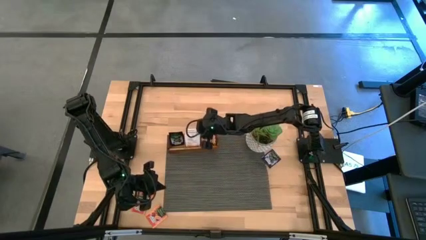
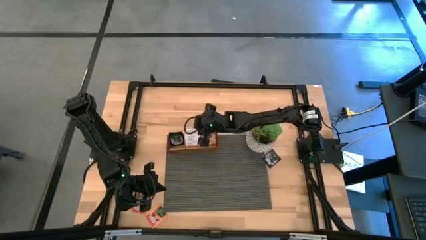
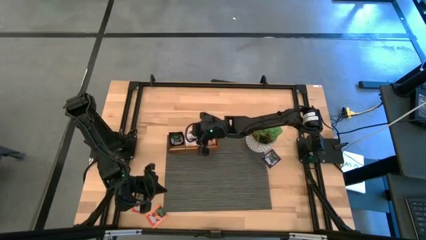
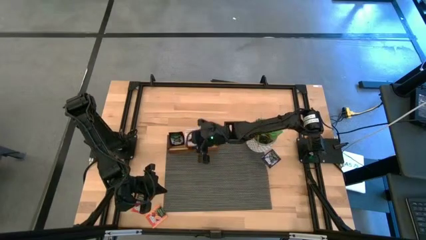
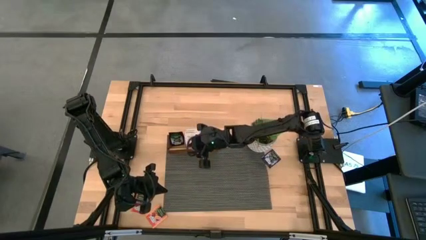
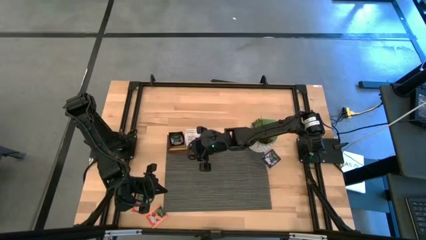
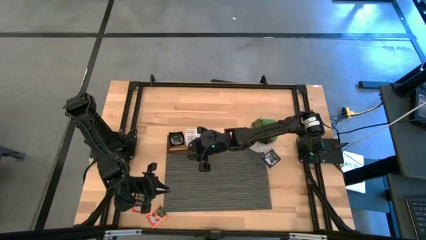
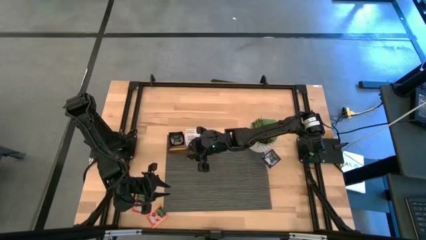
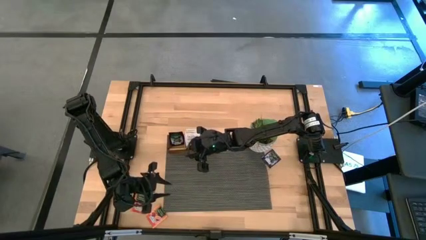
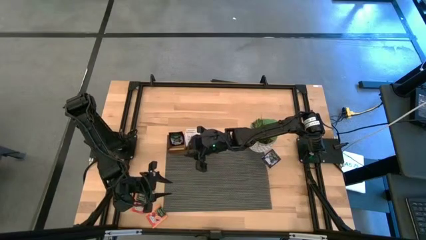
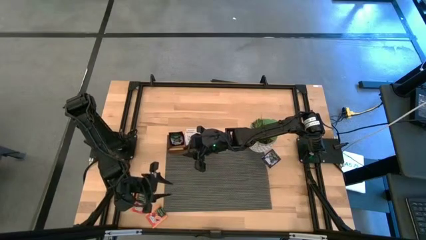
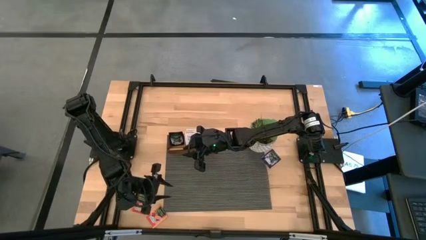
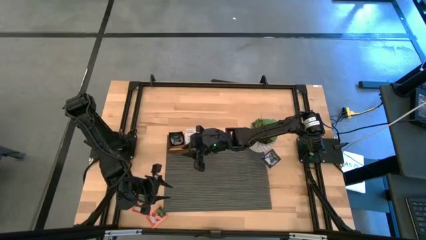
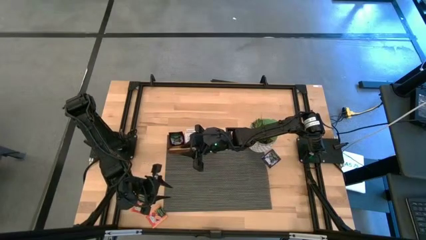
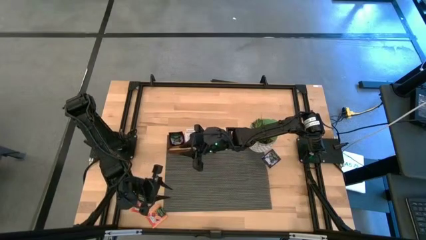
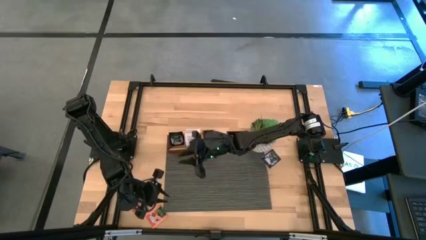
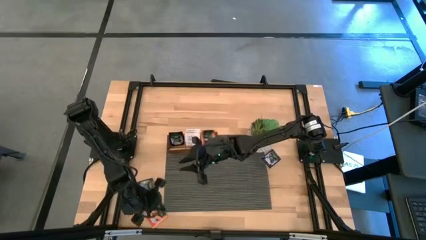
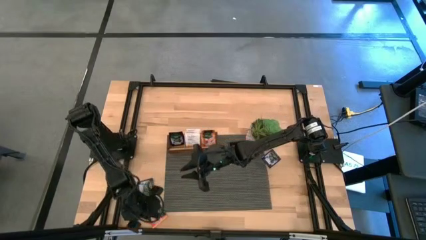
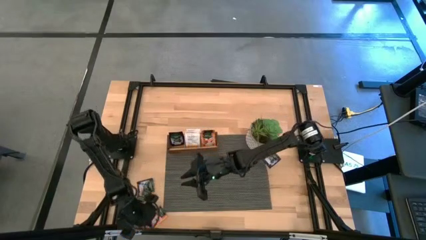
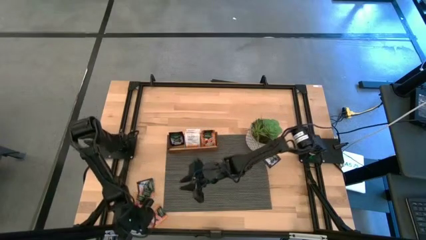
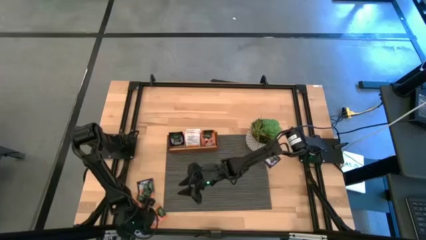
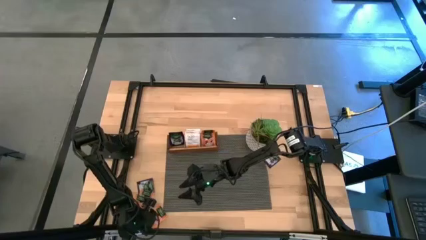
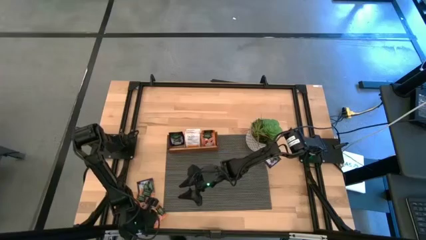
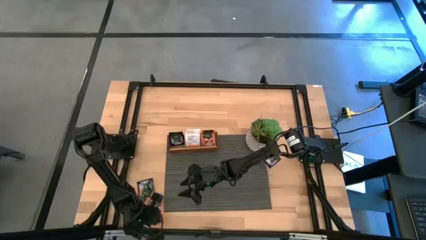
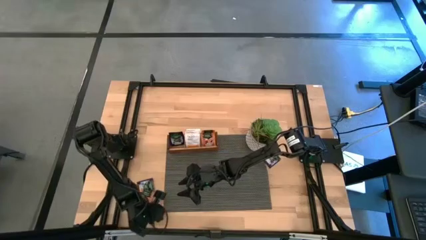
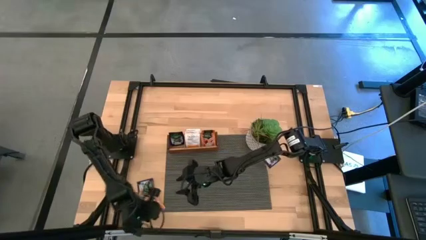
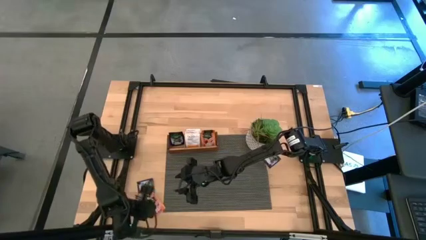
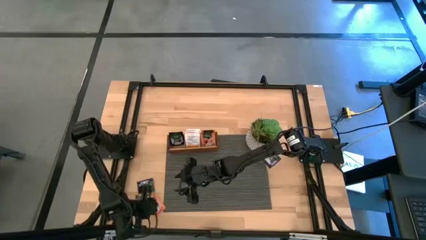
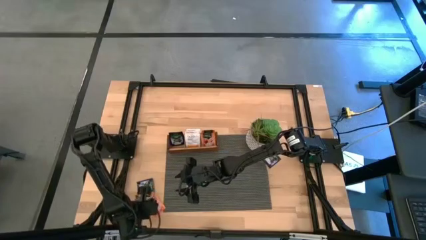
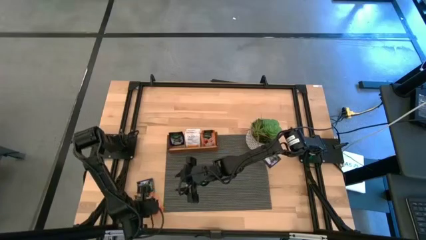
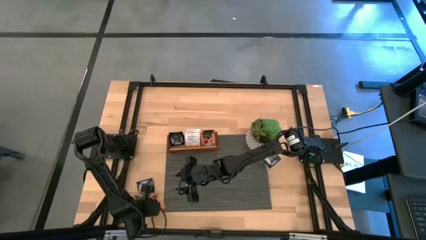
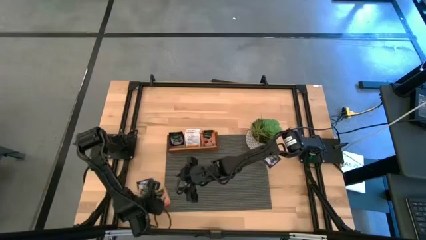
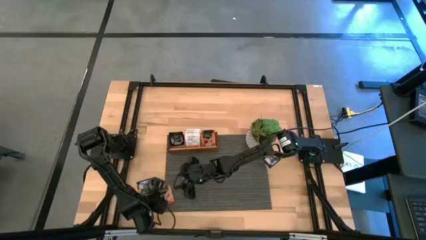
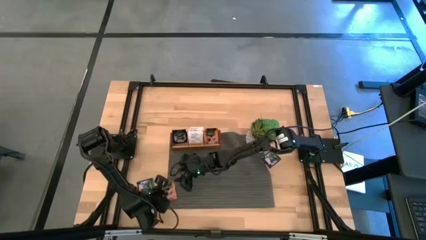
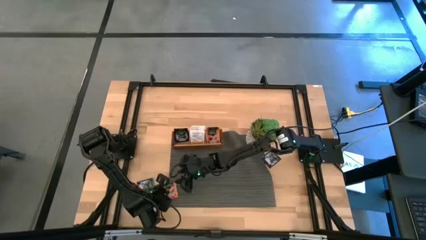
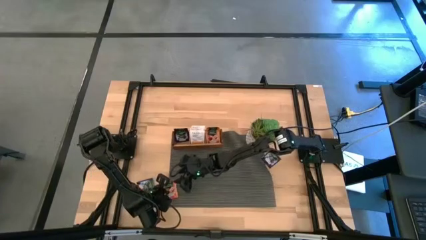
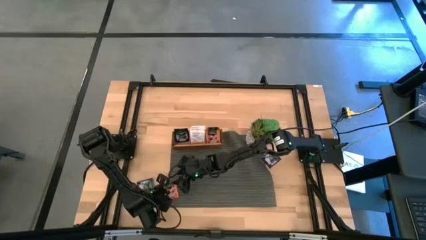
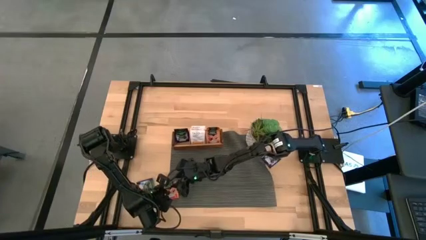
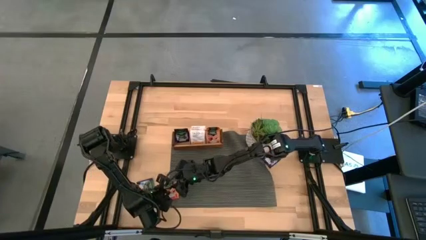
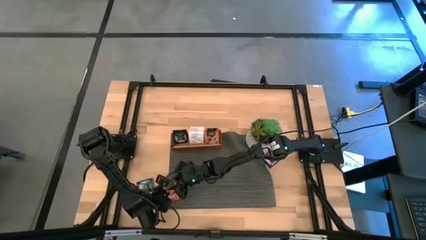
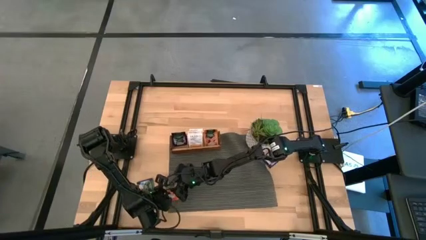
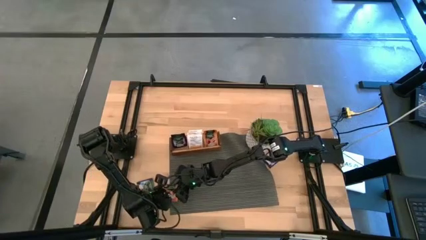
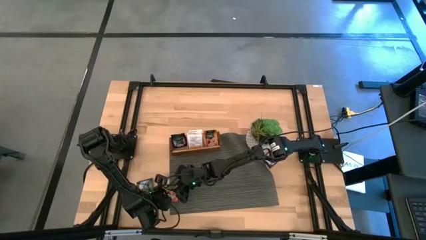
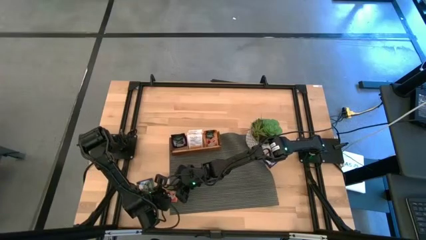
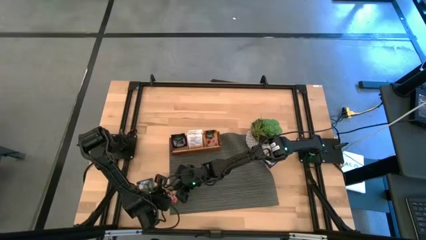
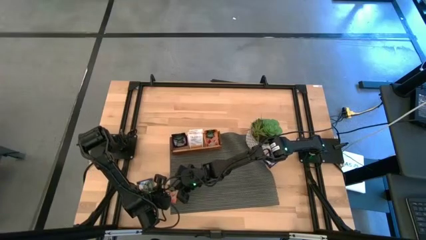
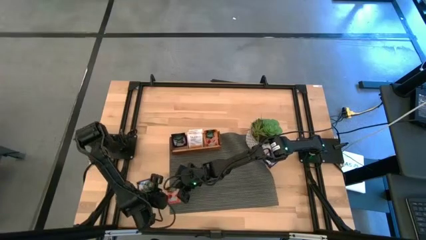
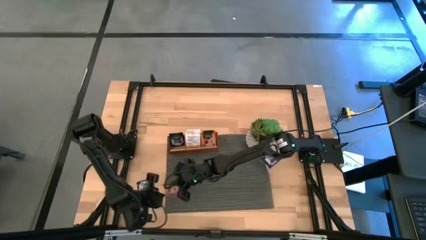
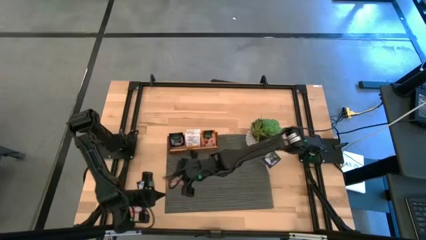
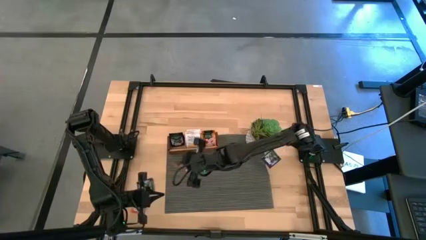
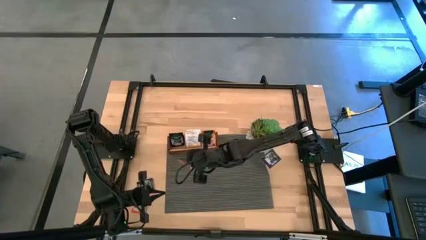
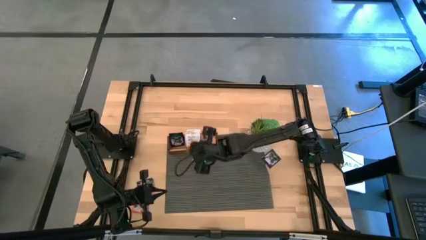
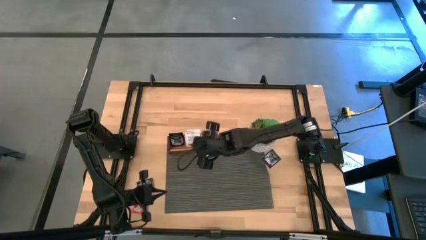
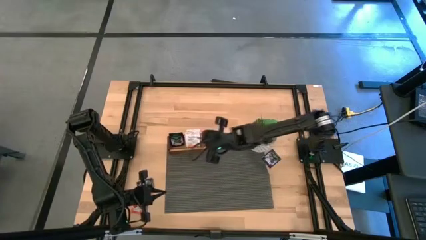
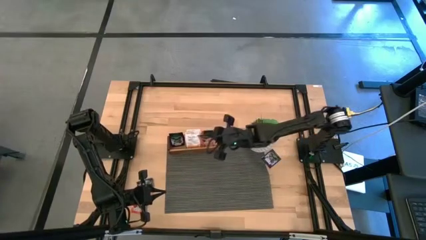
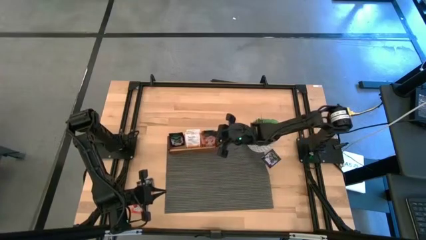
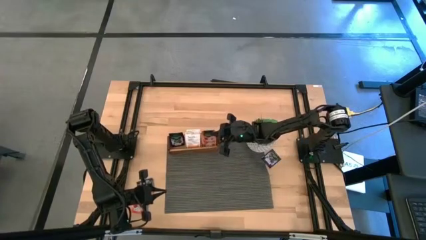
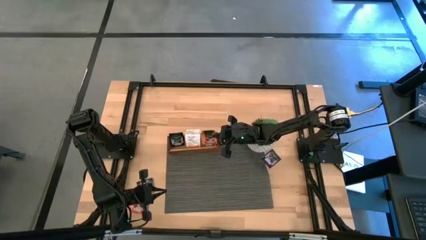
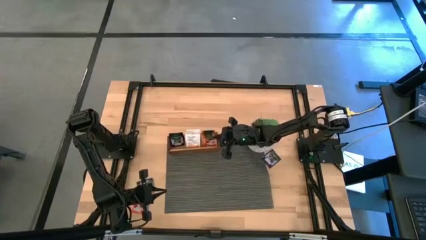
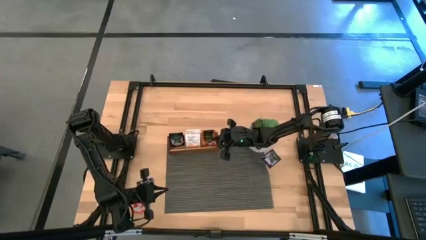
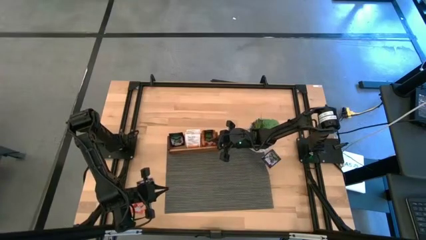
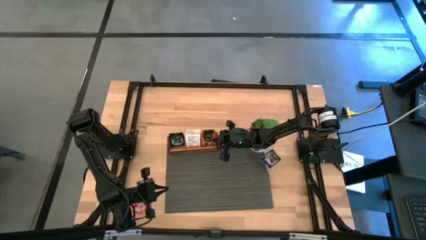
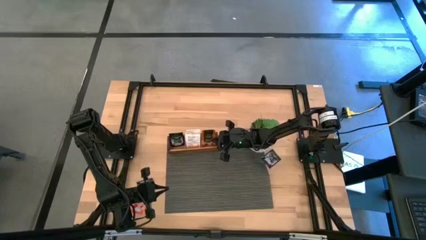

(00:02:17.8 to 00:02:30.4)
Task: Pick & Place Tea
Put the orange tea bag to the right section of the wooden organizer

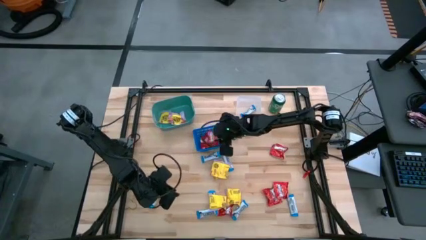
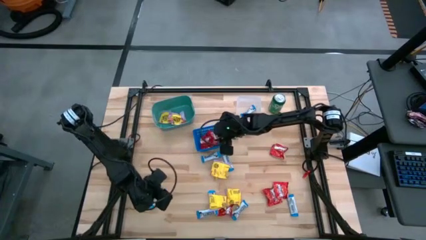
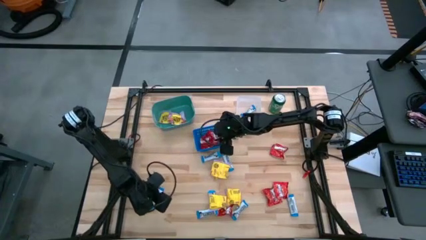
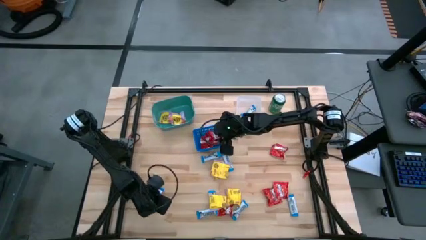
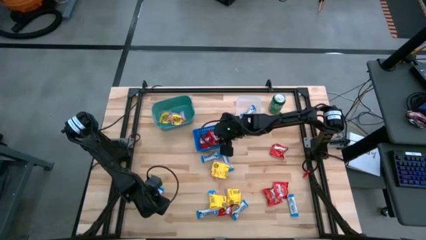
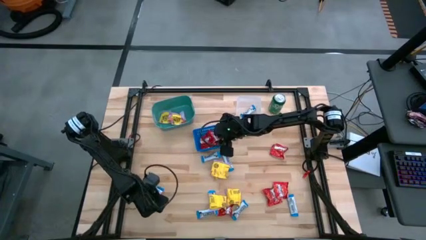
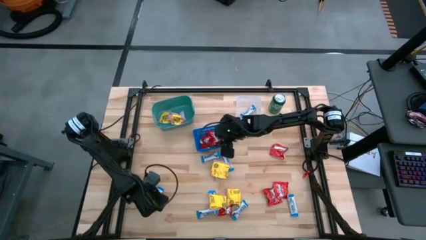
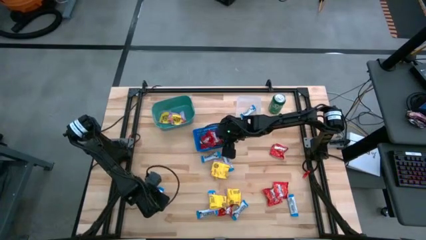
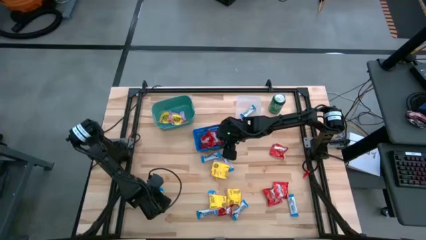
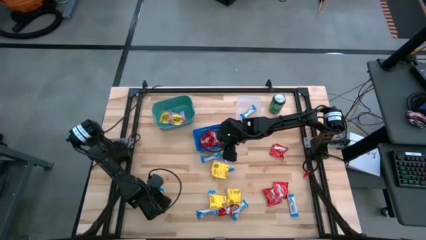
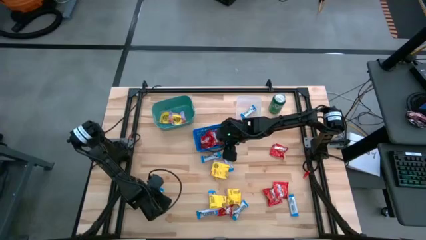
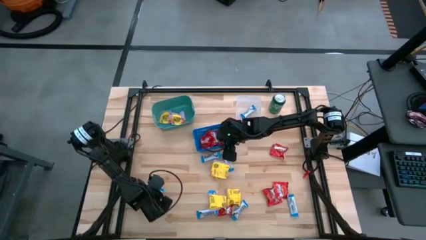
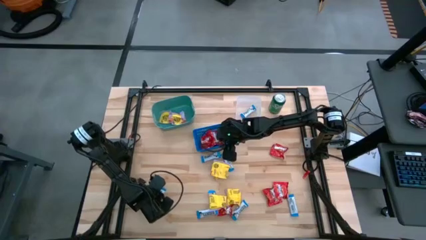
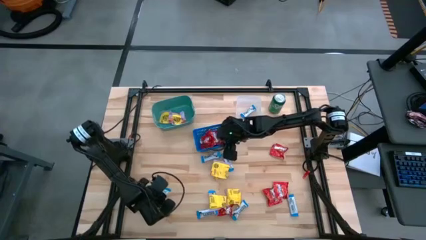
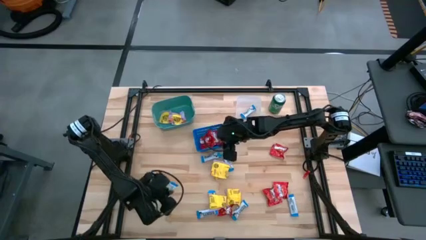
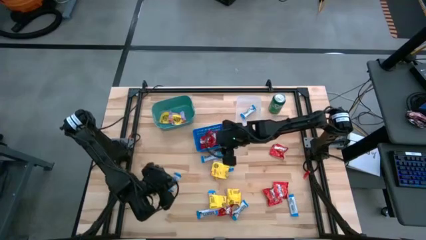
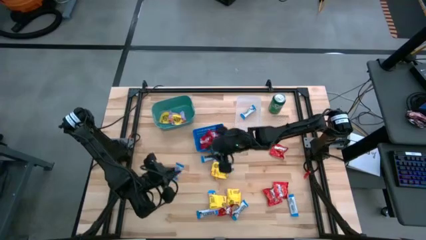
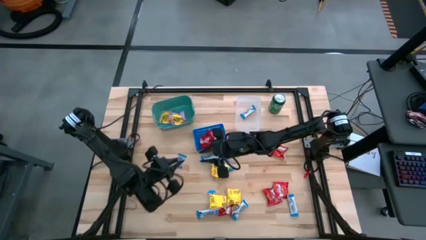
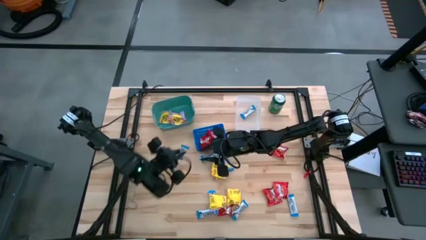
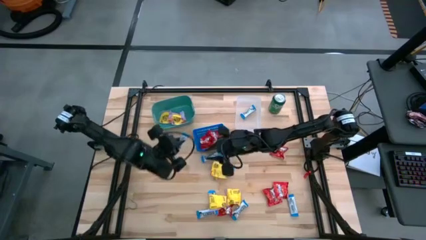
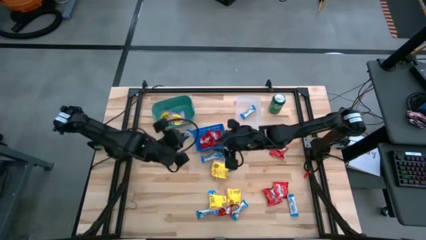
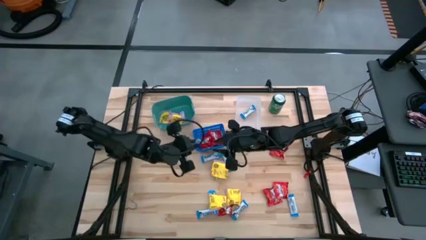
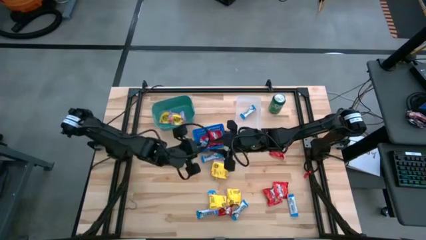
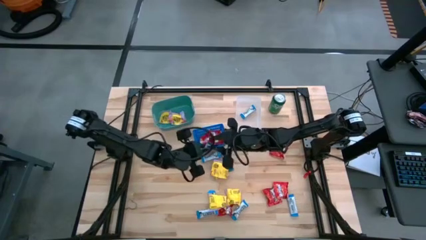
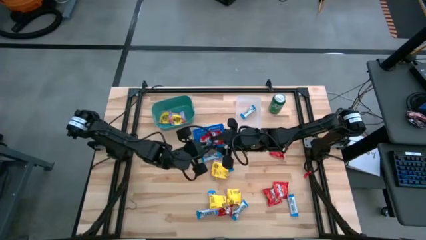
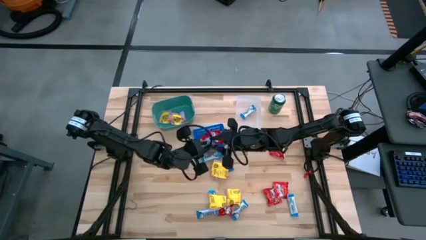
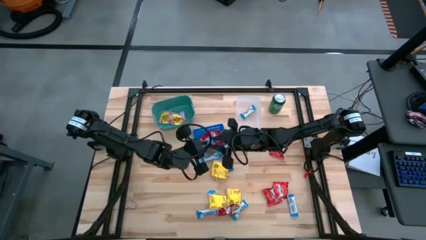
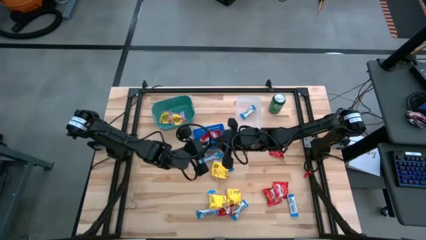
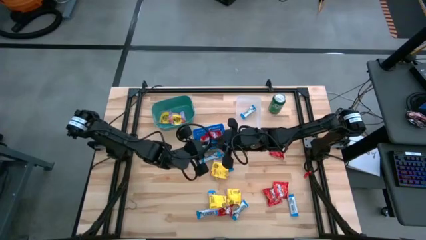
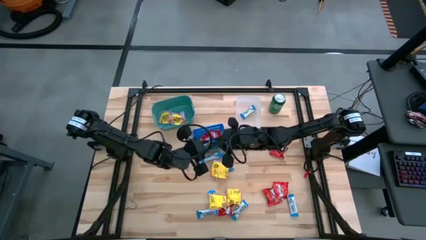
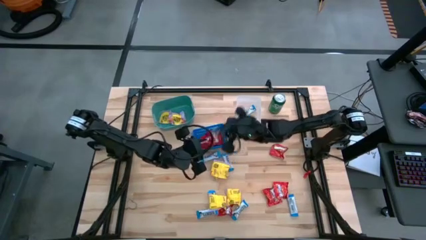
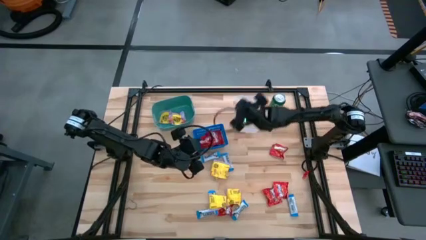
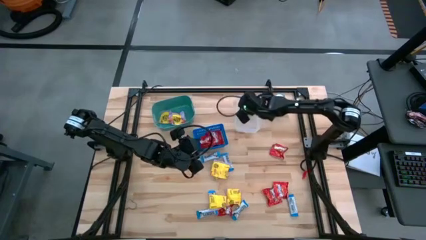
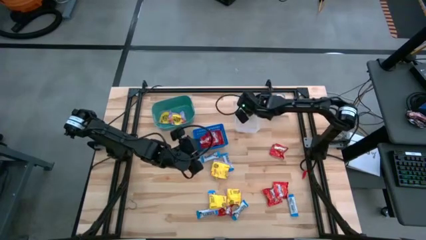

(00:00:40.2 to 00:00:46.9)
Task: Sort candy
Put the hersheys bar into the transparent bin
